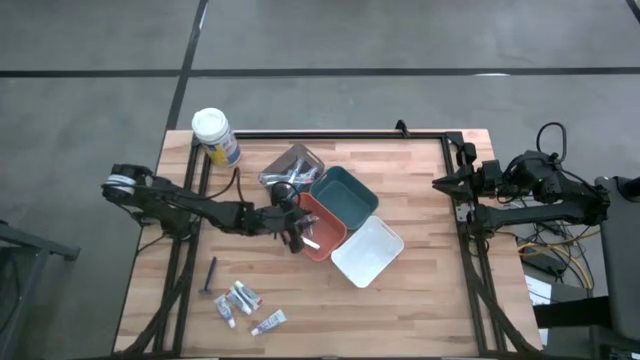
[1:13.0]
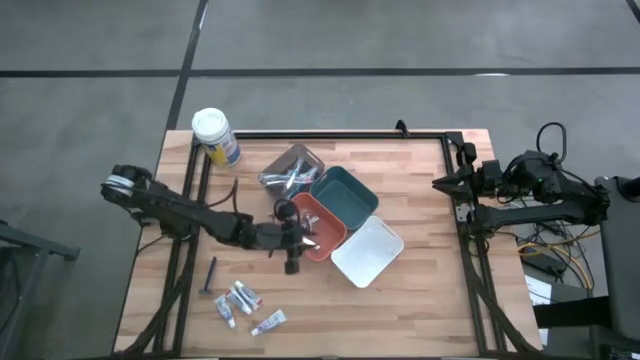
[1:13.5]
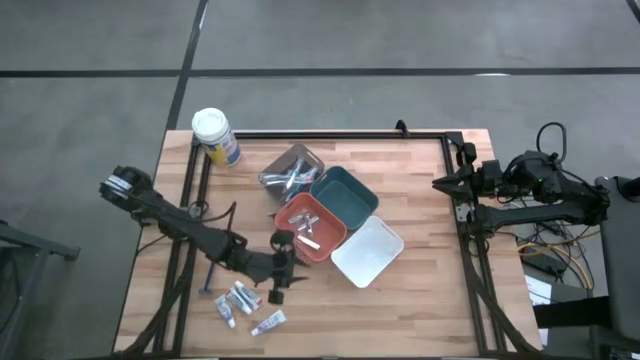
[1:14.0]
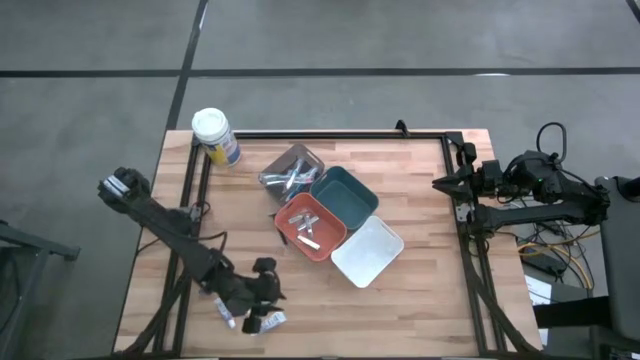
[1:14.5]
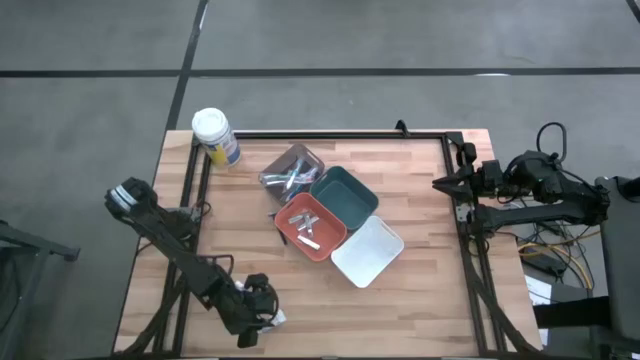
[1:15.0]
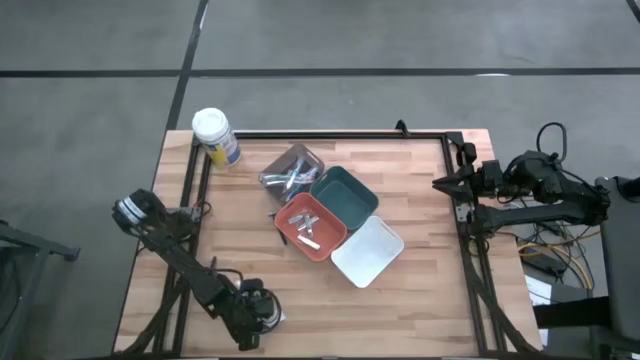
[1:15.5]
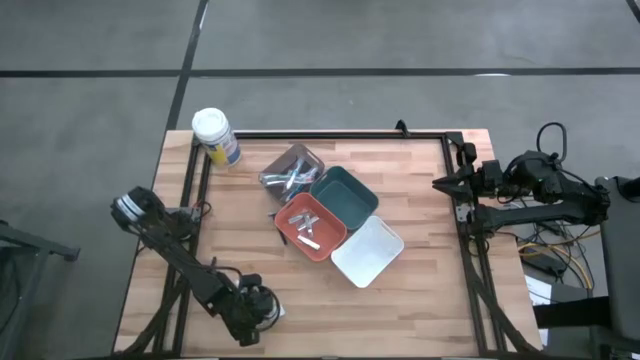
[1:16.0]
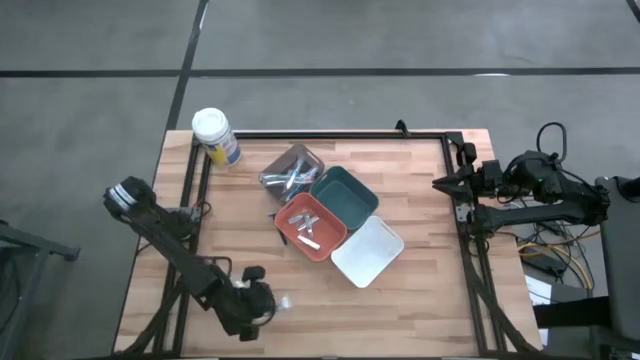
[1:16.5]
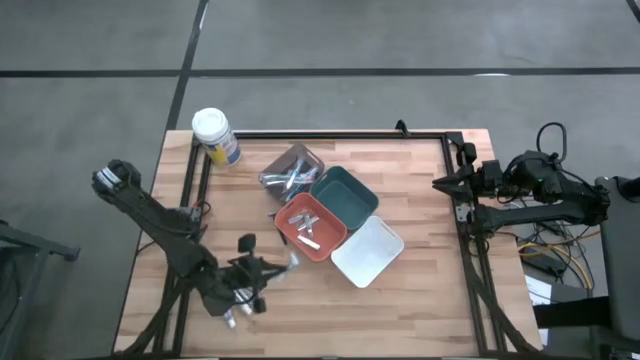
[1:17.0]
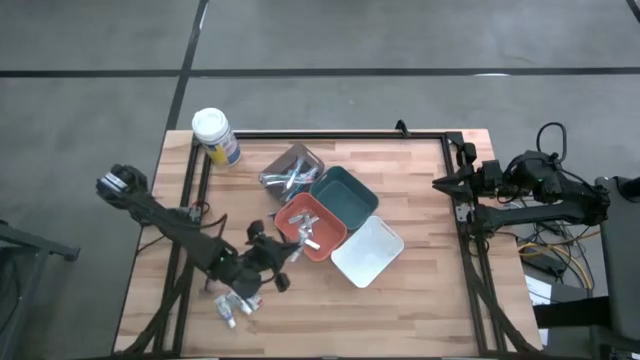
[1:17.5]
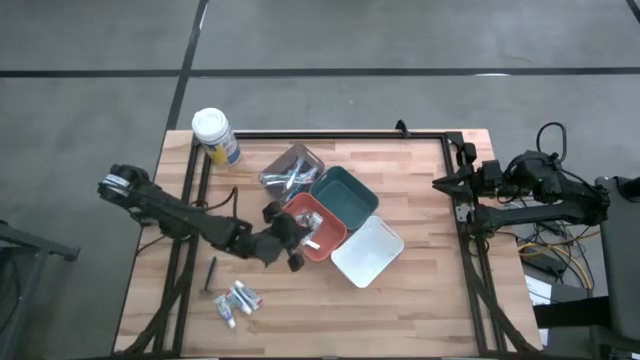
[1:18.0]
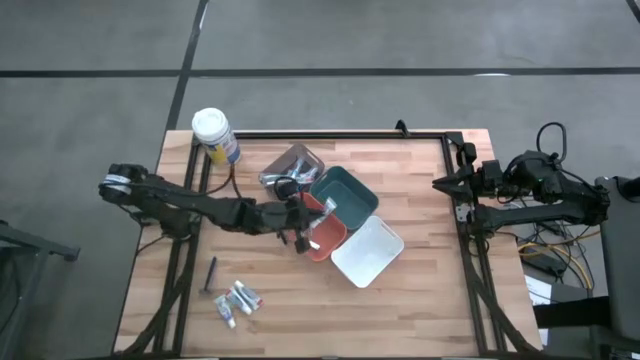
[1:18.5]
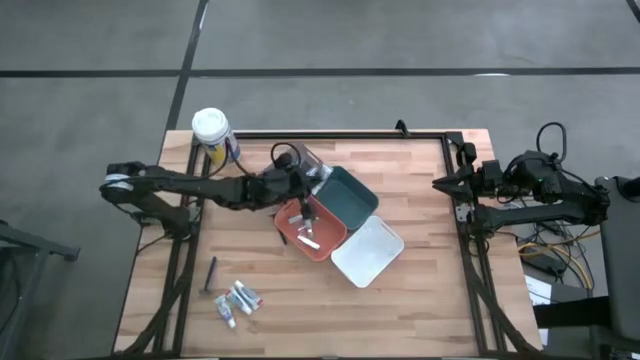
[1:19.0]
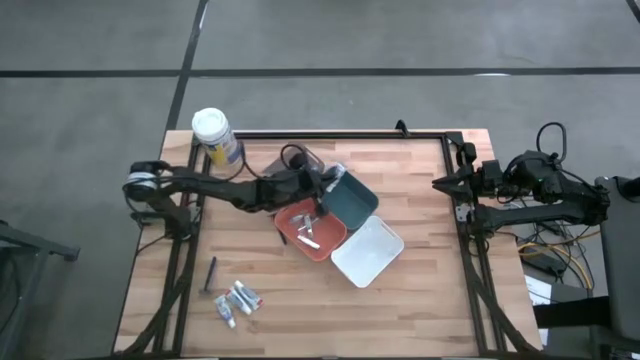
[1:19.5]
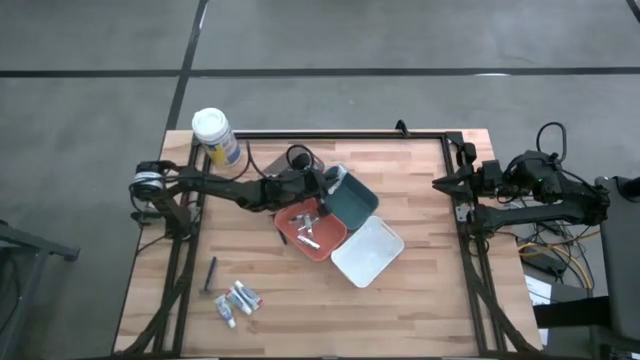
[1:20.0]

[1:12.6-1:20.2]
Task: Pick & Place Travel size toiletries
Put the white toothpaste into the blue bin

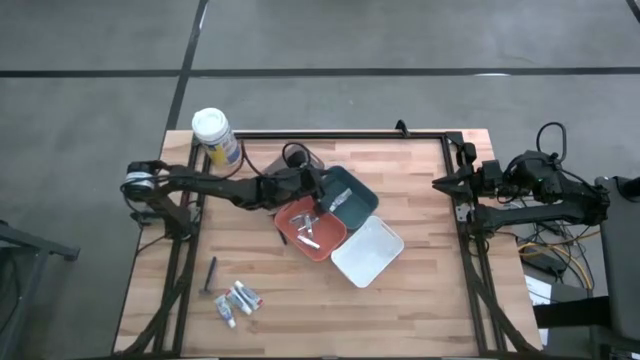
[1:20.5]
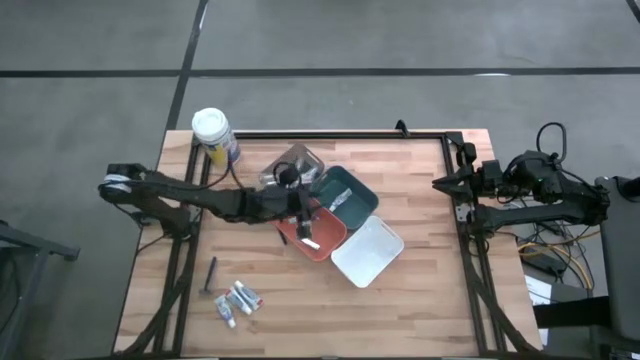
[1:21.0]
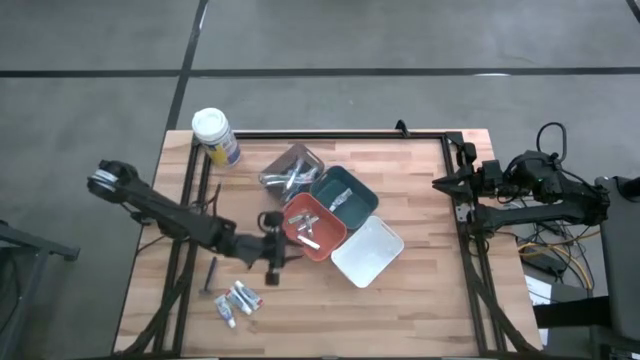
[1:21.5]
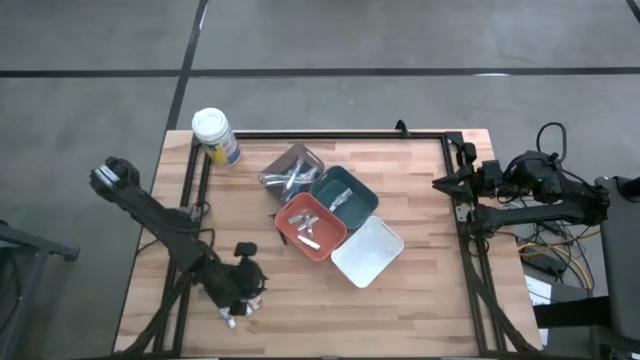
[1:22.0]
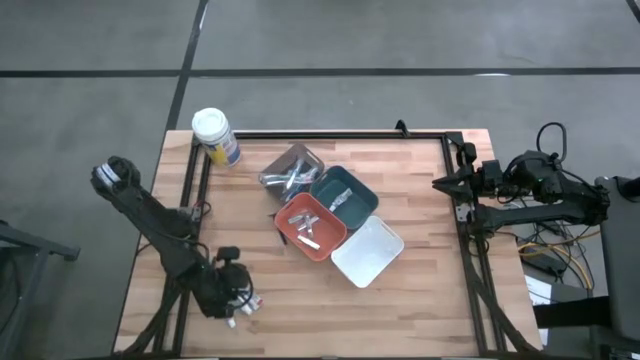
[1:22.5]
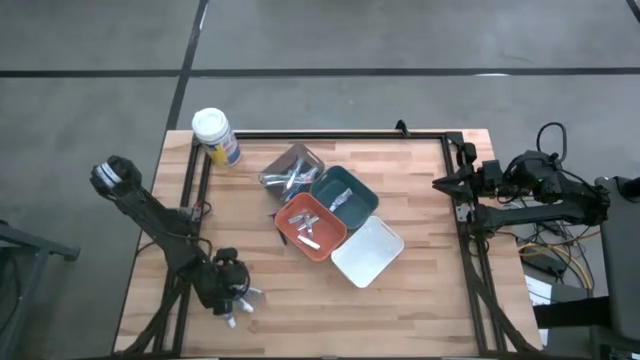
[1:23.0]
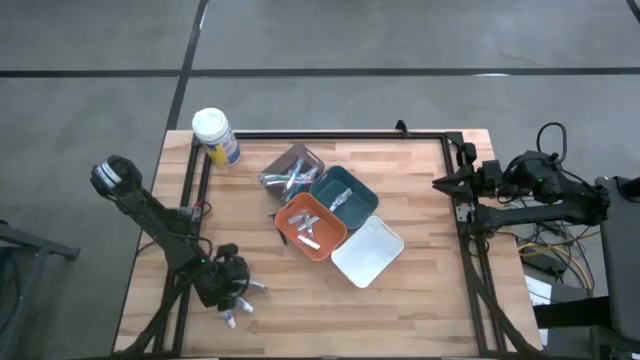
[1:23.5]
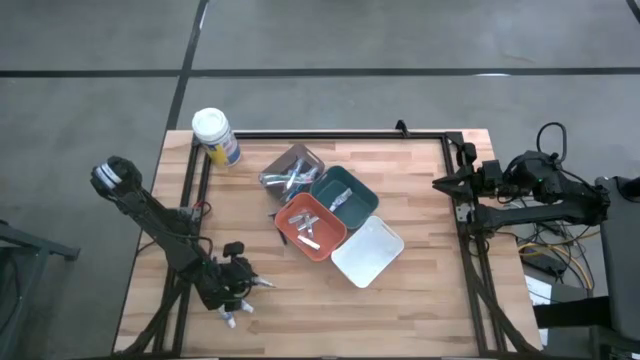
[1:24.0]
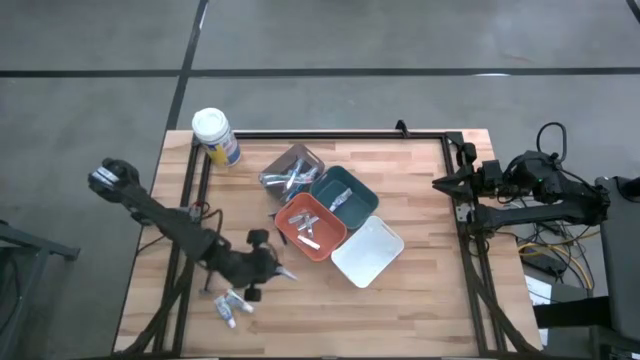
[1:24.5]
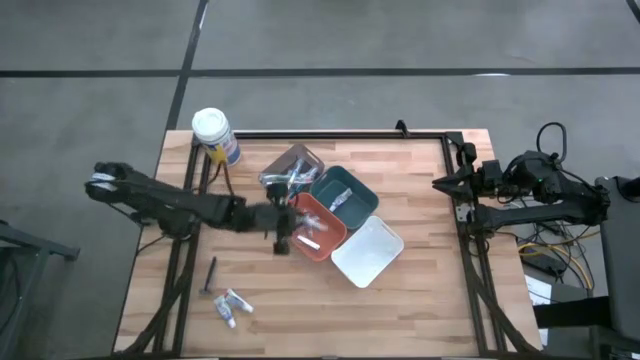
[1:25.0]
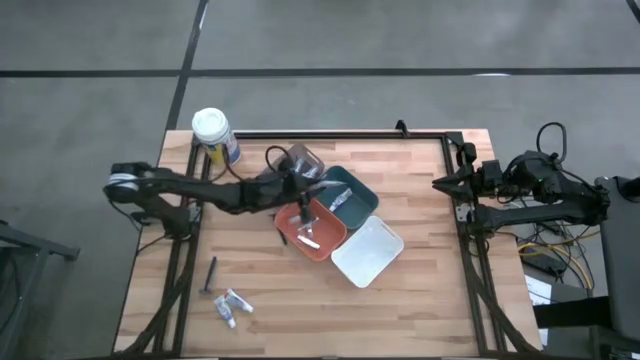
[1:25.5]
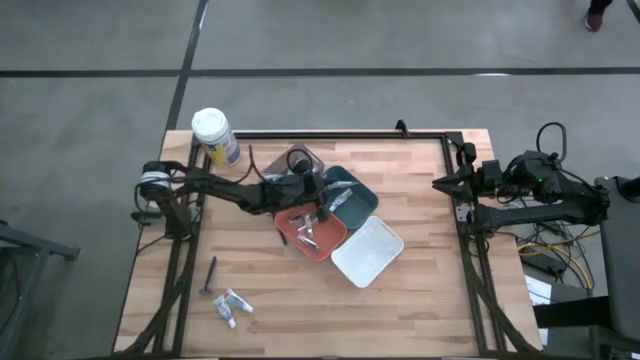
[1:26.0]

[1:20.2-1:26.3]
Put the white toothpaste into the blue bin

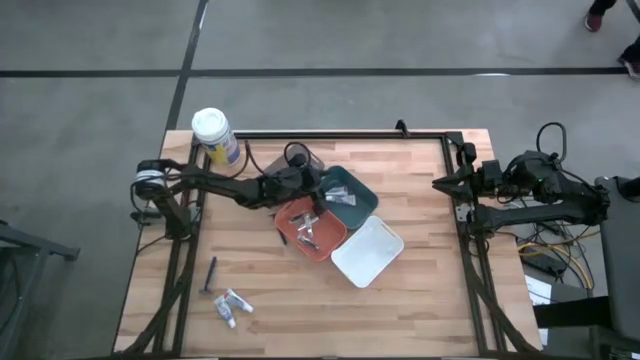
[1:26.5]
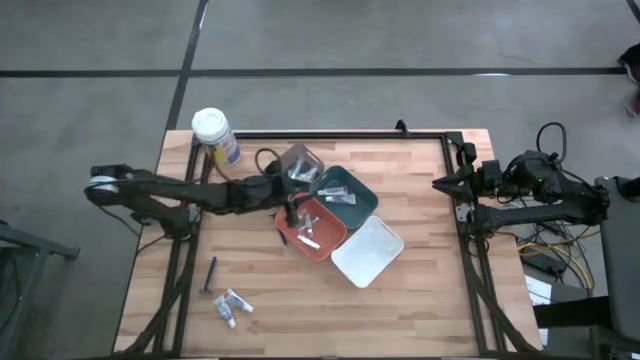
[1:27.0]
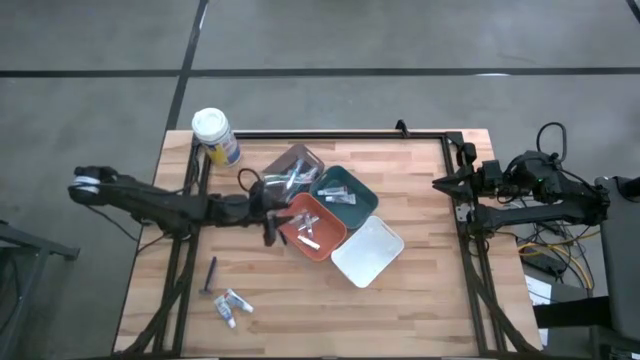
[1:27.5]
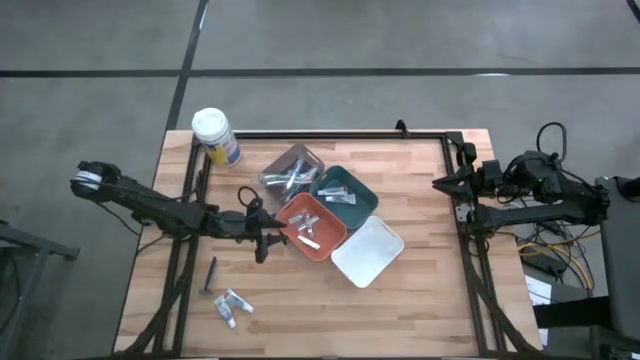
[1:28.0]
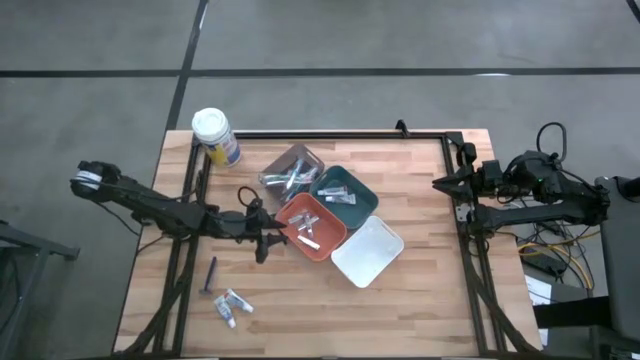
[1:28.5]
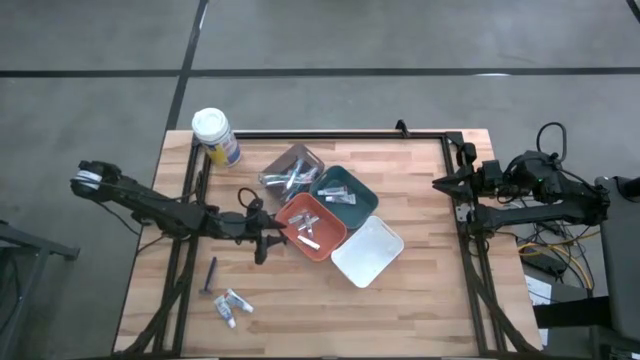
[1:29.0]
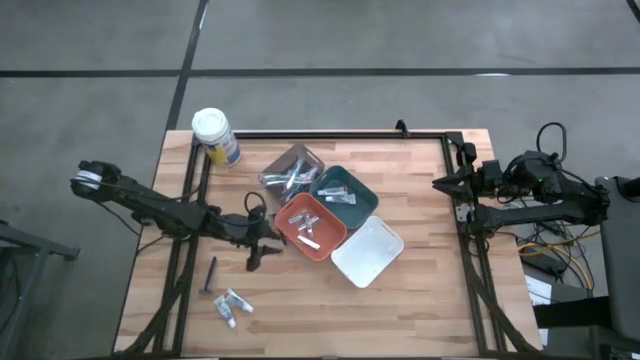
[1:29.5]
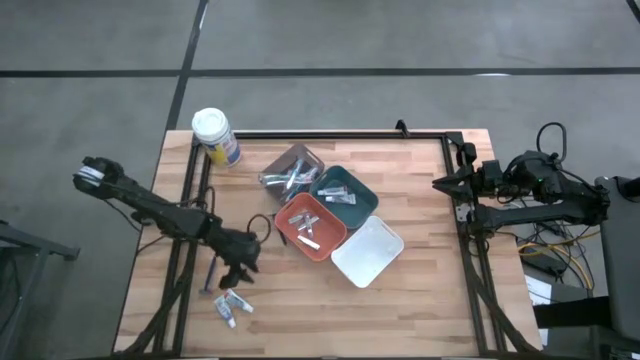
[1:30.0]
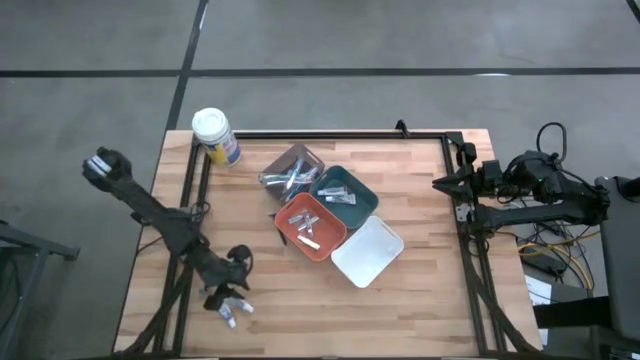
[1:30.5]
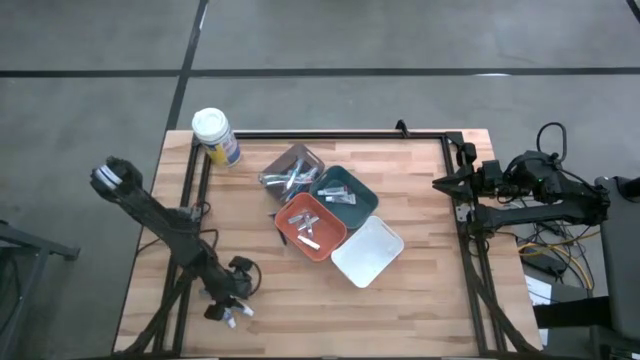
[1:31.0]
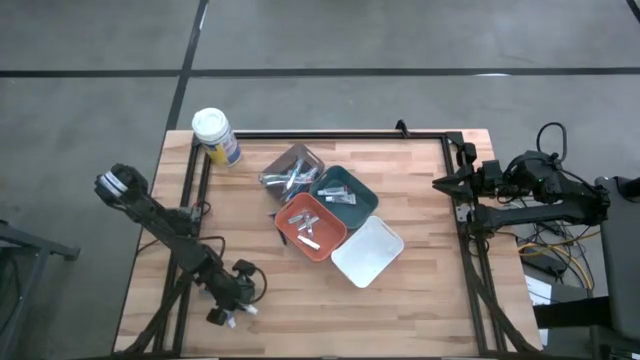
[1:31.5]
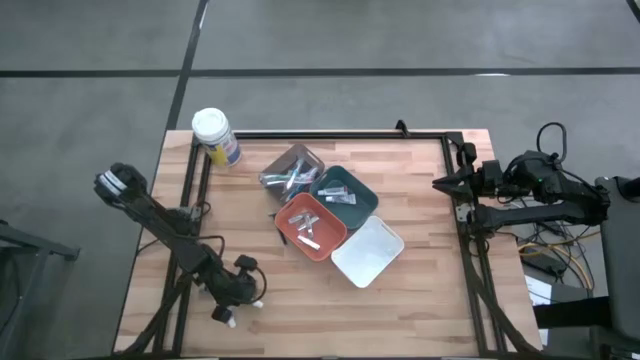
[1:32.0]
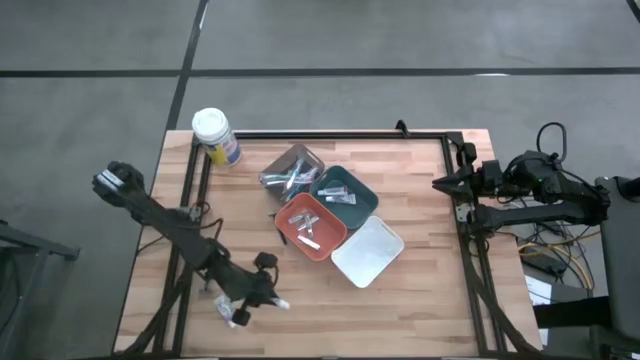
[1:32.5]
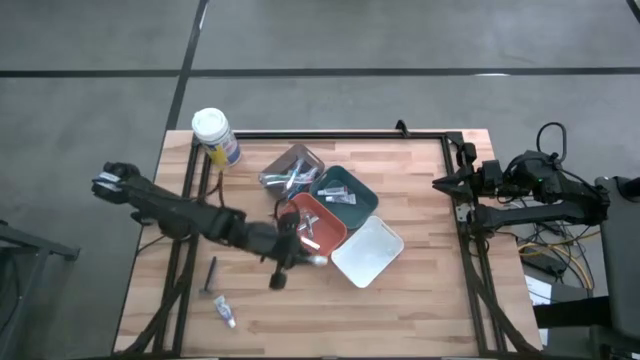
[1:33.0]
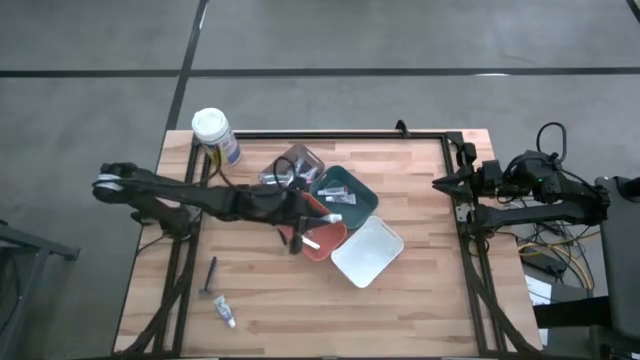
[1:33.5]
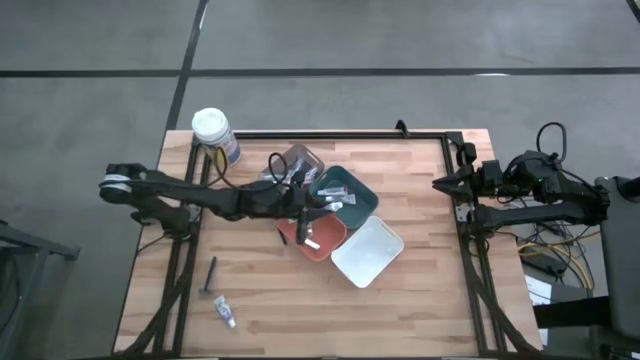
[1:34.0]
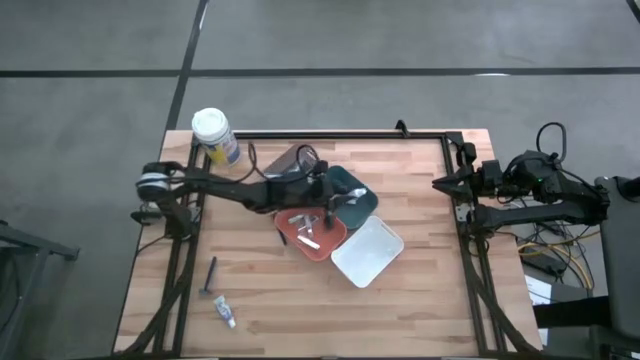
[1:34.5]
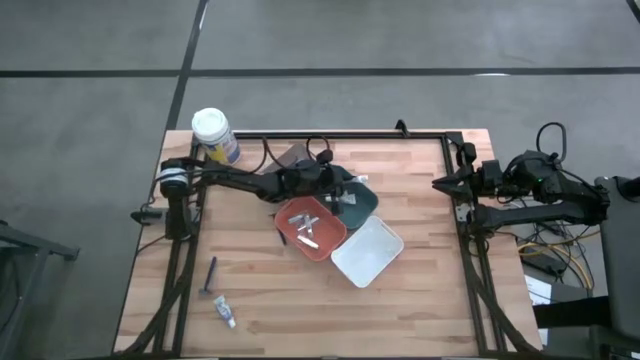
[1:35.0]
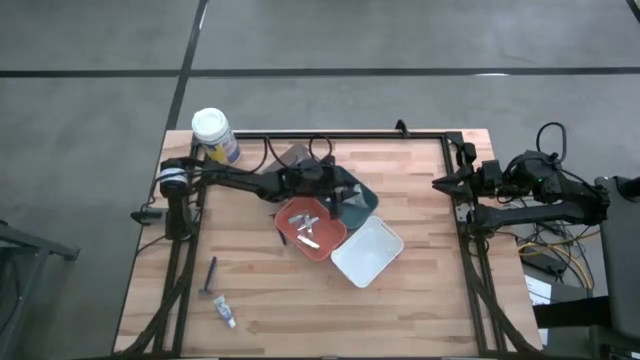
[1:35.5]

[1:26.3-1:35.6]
Put the white toothpaste into the blue bin
